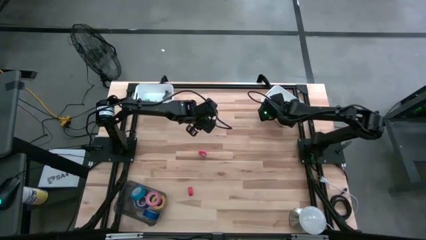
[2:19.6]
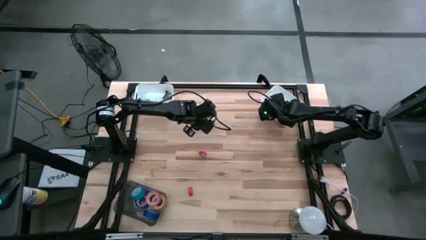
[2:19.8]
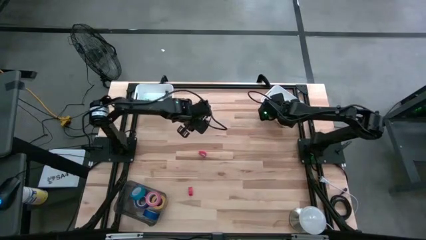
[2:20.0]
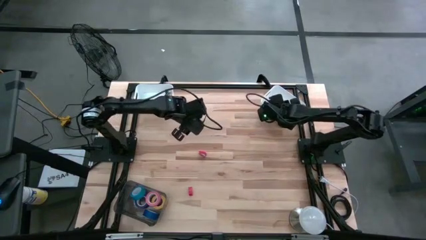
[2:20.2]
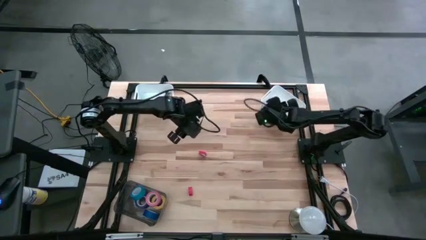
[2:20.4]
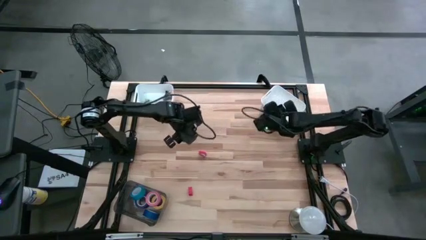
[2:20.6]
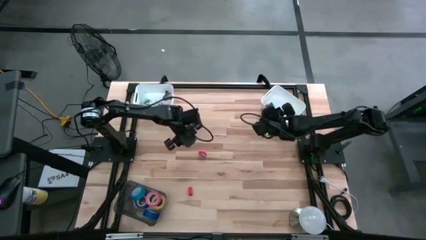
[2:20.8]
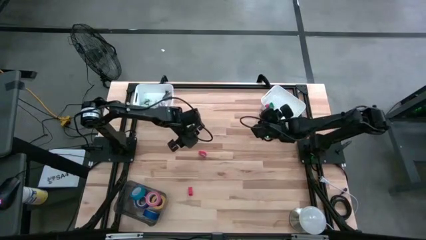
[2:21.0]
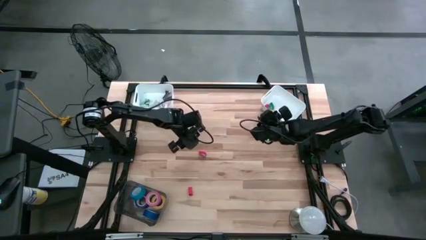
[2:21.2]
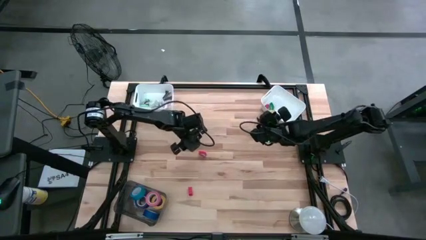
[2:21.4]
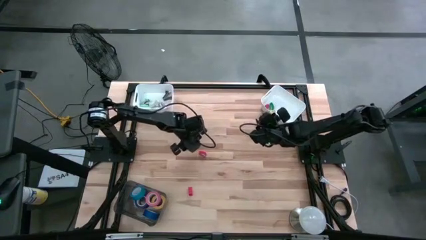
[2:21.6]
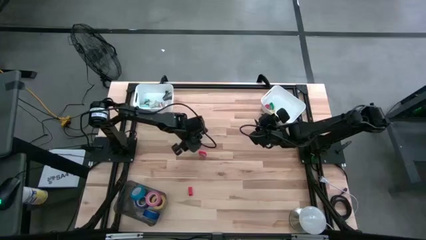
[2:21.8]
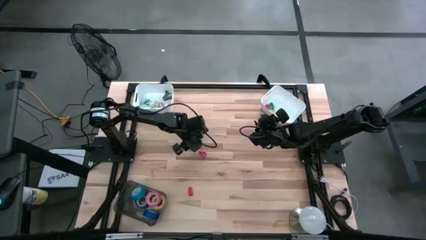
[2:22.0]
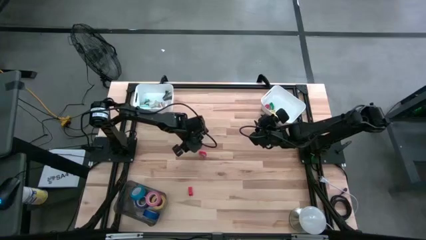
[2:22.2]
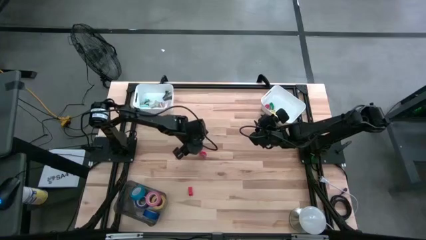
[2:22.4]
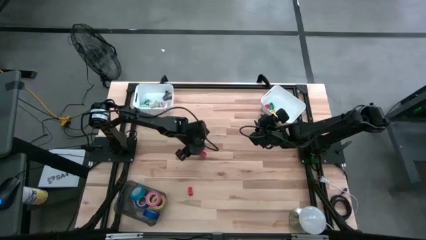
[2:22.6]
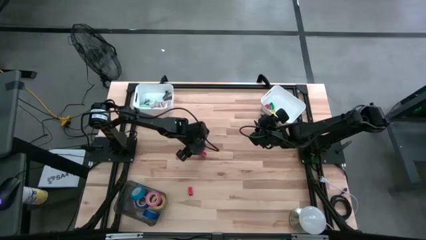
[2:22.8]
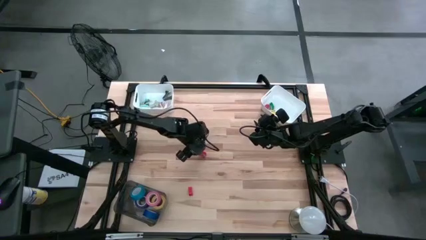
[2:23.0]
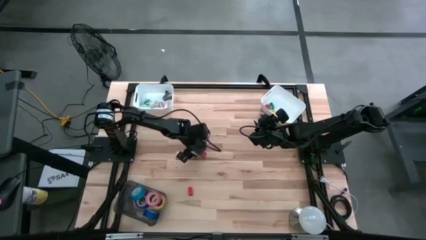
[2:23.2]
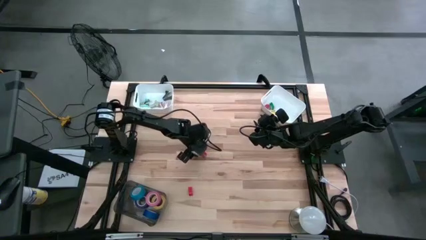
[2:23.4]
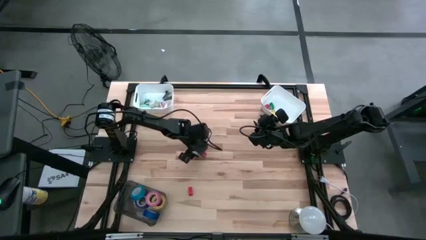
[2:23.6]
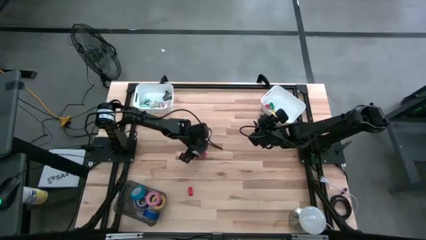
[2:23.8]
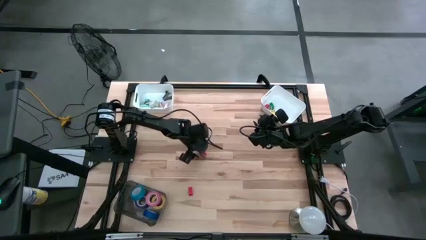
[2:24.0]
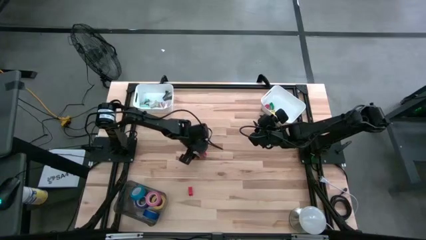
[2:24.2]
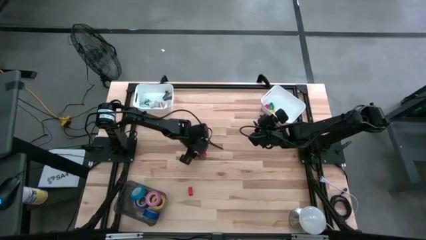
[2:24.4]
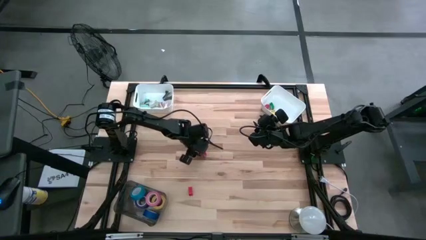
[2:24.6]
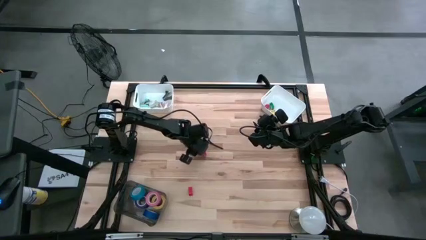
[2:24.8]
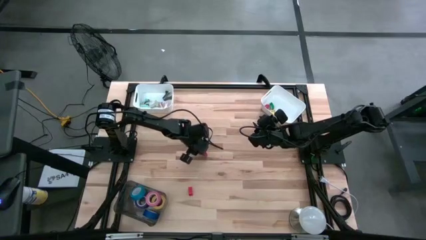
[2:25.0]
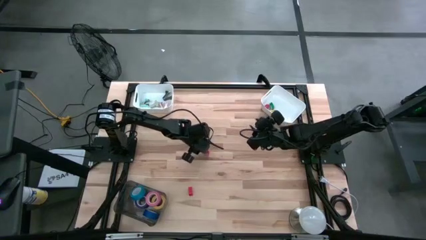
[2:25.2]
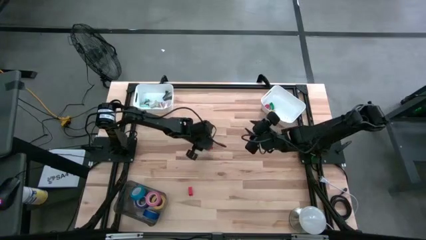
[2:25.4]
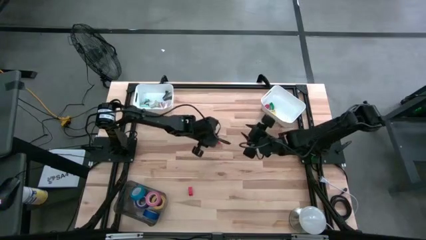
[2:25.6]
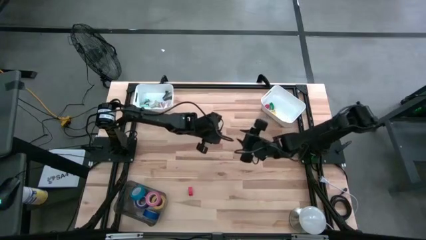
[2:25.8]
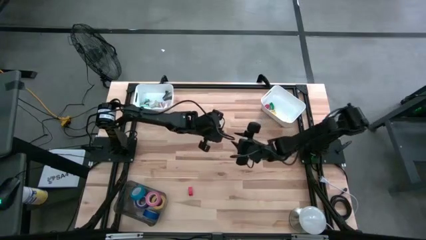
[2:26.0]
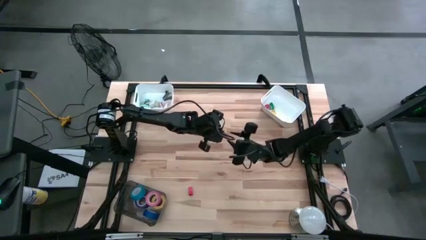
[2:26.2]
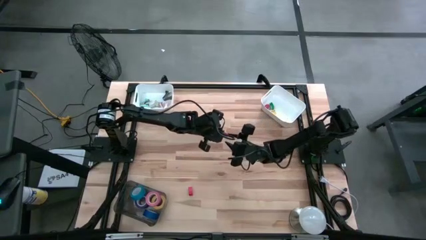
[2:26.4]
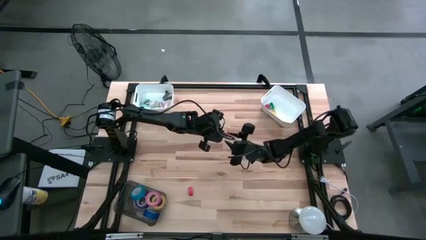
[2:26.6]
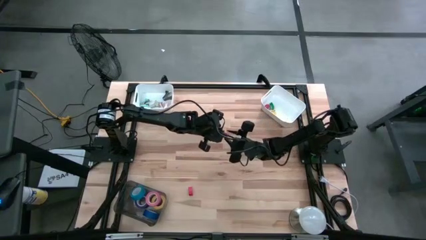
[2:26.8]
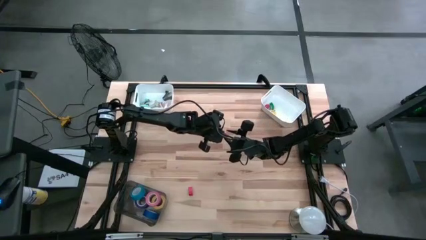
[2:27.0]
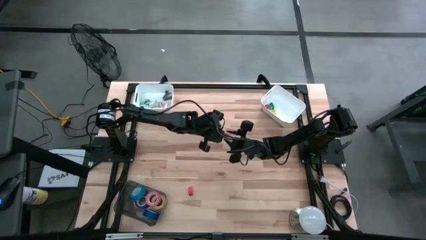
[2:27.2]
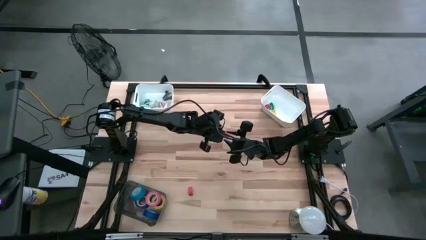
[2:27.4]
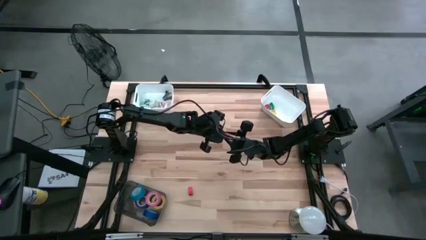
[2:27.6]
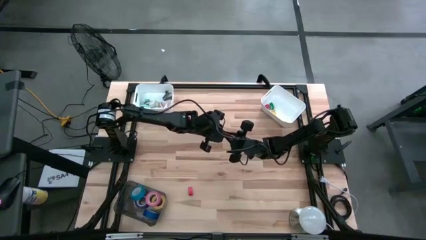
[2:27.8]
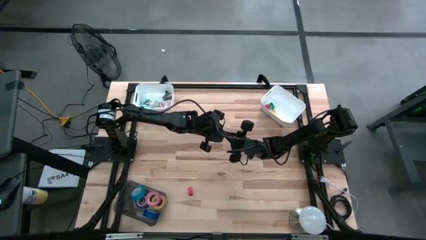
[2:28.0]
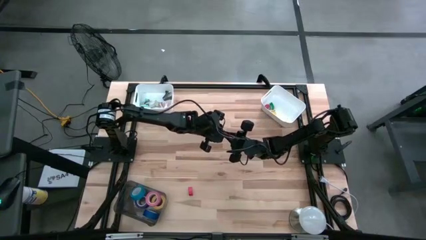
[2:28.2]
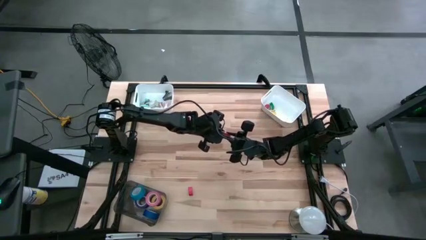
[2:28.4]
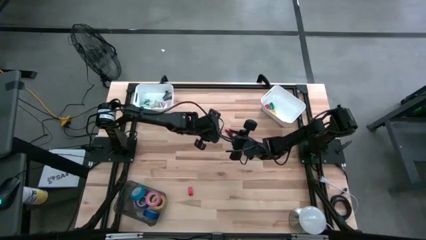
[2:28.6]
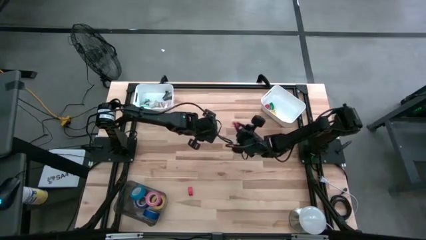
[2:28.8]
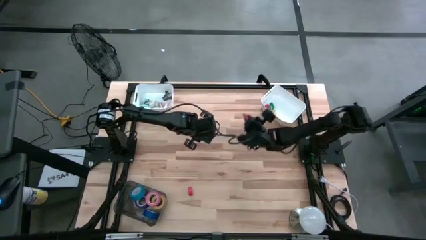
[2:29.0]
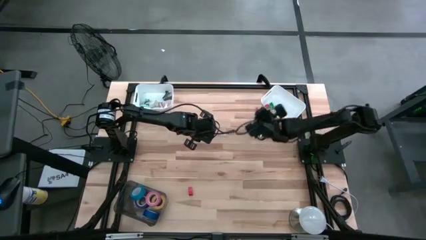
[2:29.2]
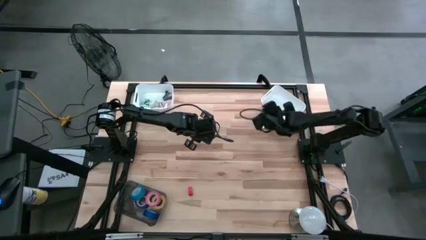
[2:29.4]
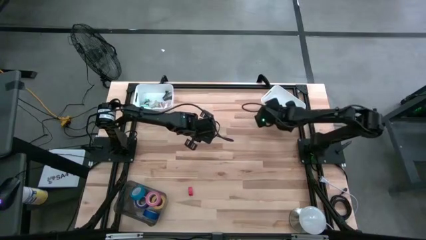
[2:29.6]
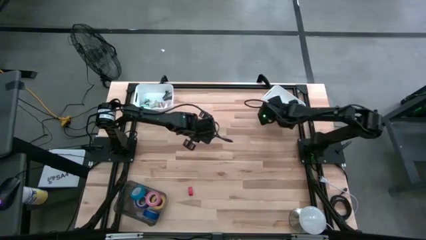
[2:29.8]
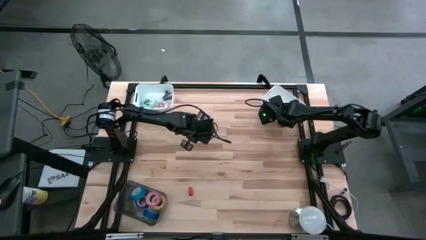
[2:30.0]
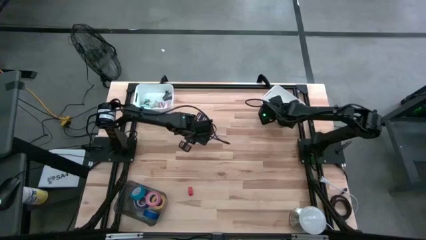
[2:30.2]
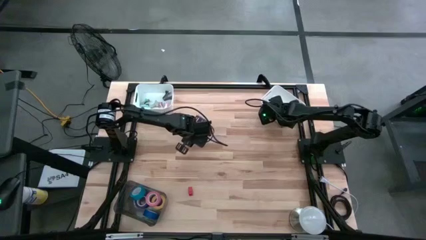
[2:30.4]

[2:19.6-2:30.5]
Task: Pick and place Stapler, Stapler remover, tape
Put the top red stapler into the right white bin

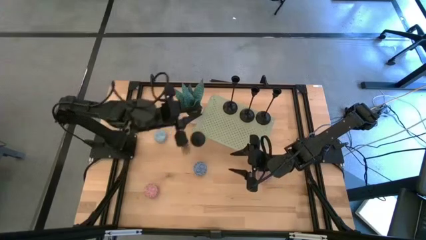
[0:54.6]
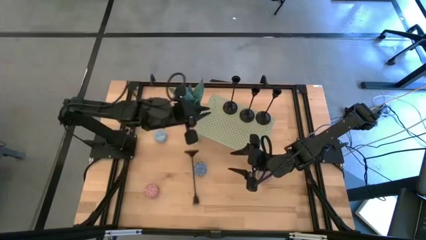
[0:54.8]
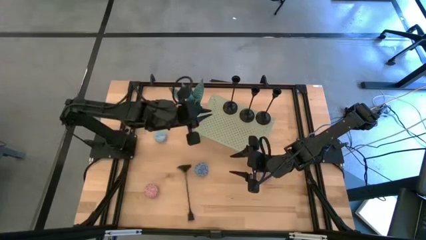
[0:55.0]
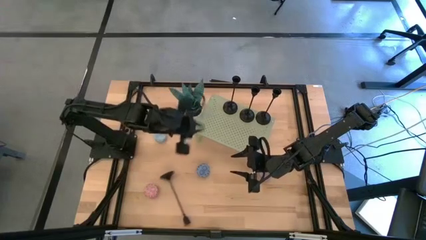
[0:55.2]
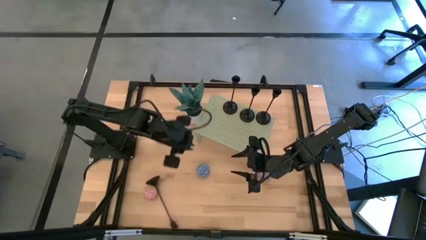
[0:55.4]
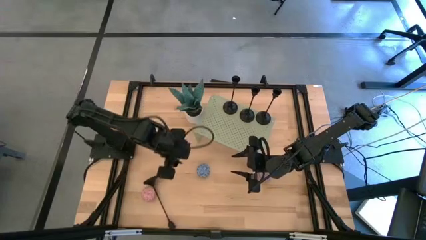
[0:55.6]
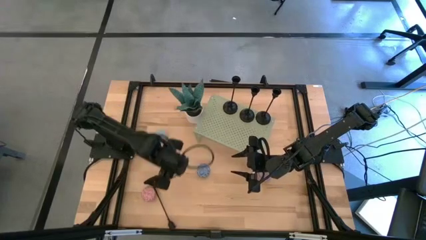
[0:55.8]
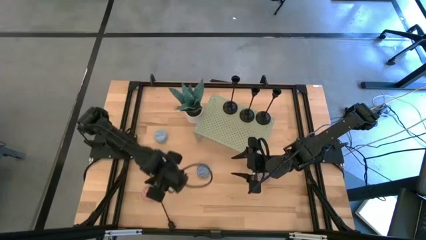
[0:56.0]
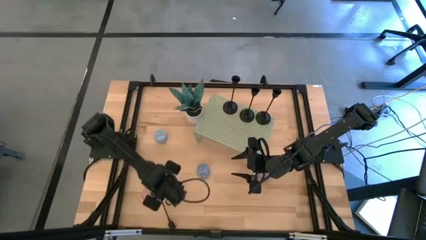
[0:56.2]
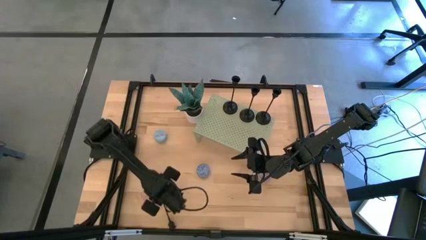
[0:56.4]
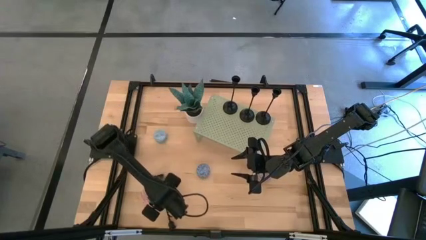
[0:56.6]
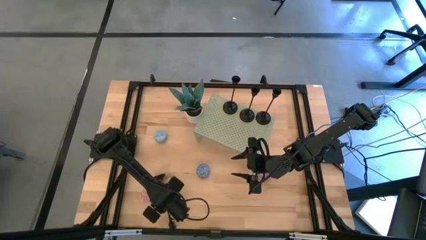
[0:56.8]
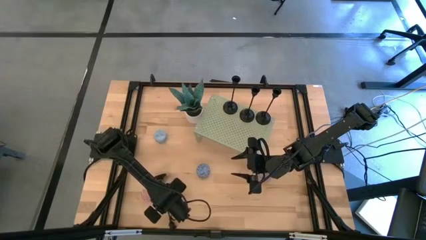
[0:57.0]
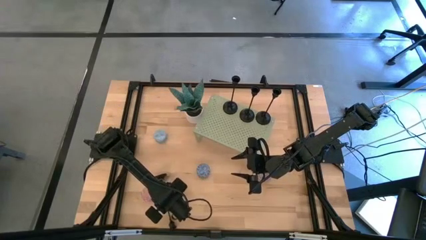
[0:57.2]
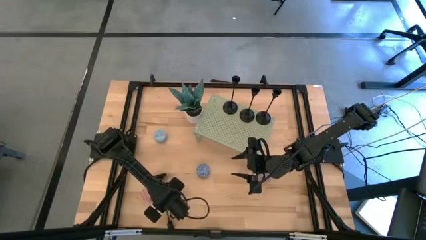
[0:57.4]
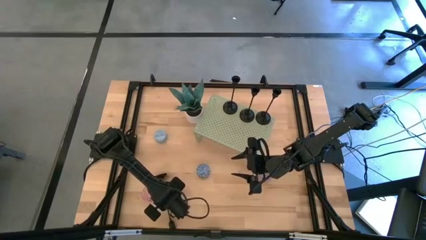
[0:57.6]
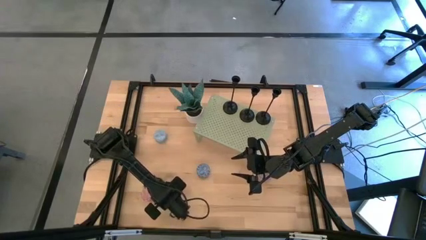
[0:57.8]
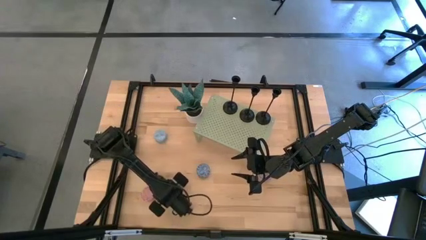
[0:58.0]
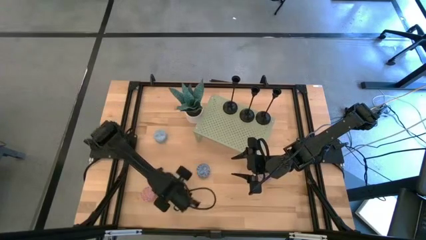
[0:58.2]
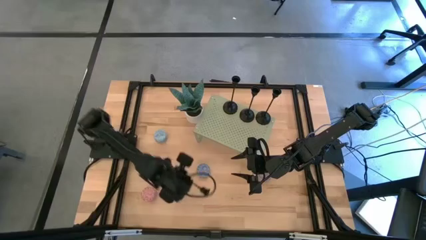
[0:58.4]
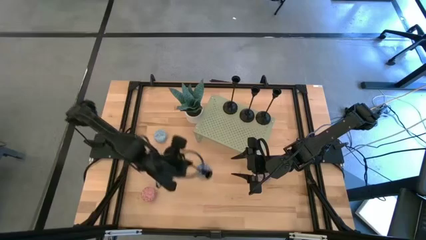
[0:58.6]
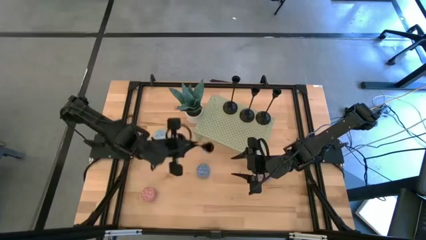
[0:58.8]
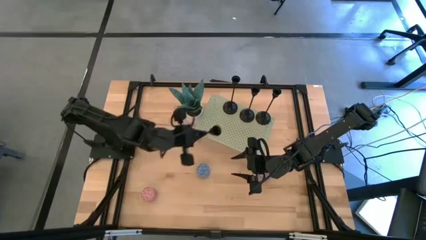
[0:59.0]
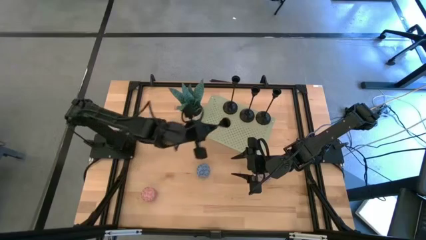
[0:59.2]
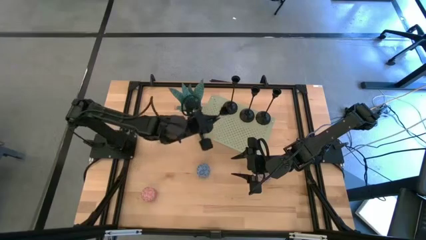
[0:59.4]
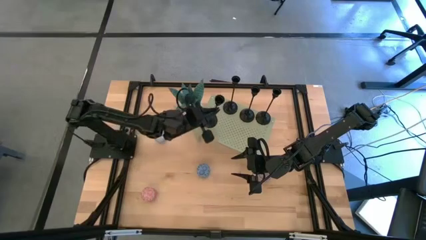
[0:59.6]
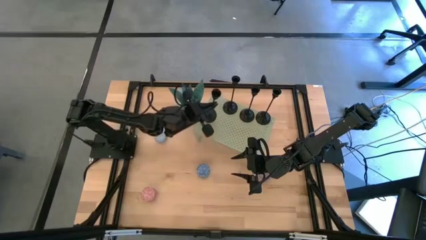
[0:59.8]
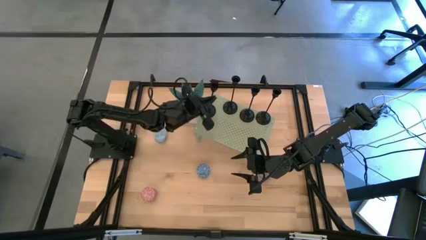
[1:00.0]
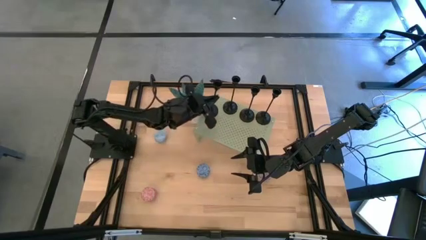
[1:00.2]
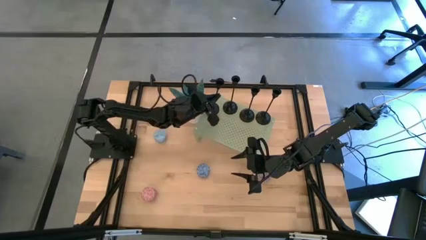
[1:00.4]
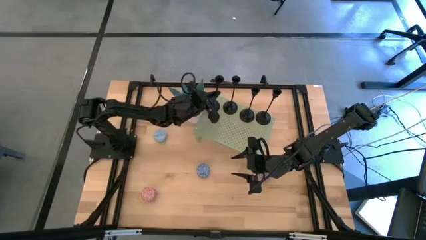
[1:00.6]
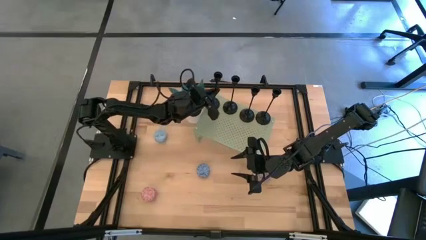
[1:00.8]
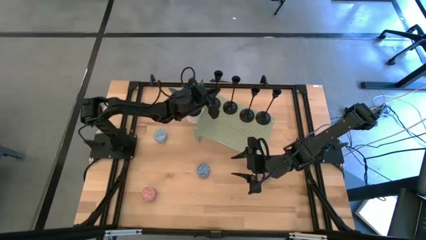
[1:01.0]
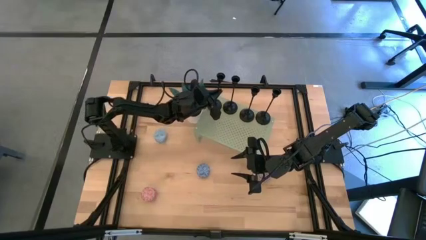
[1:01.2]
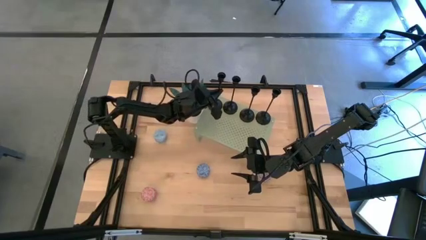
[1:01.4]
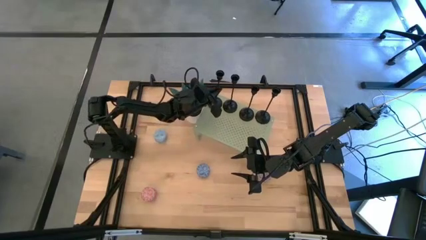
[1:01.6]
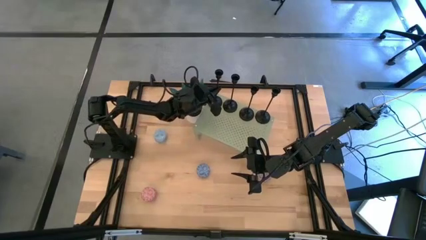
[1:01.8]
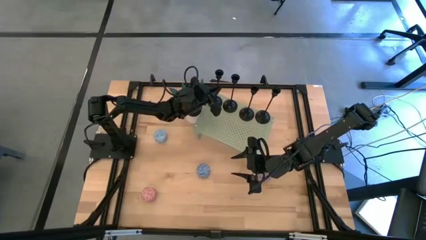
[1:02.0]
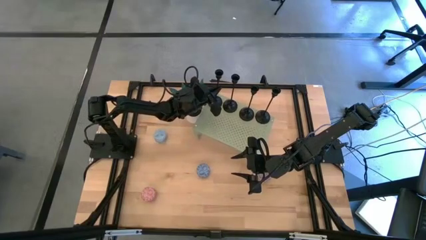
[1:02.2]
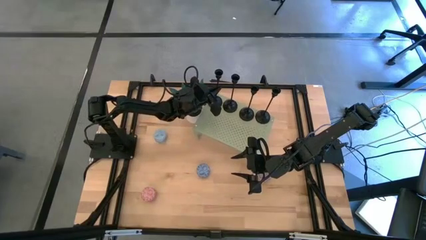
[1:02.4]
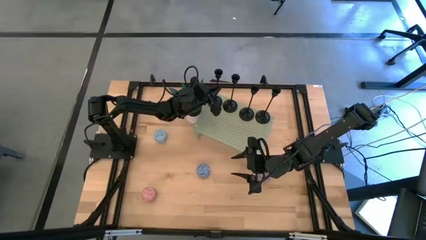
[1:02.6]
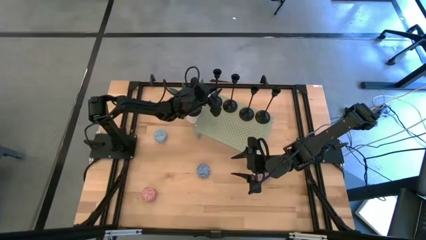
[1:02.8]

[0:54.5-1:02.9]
Task: Stock candles and holders on shelf
Align the black candle holder with the other black candle holders on the shelf
